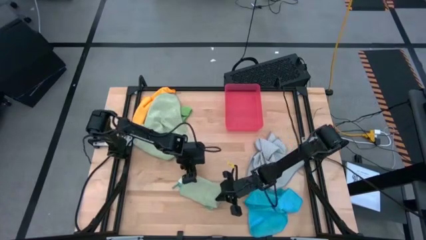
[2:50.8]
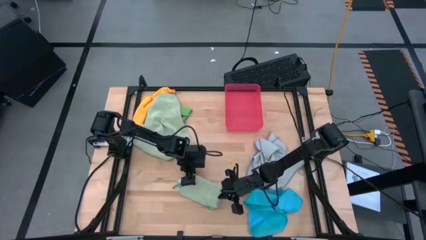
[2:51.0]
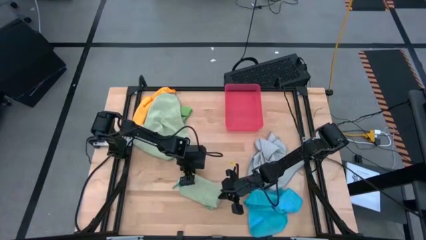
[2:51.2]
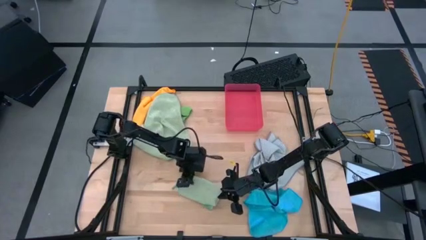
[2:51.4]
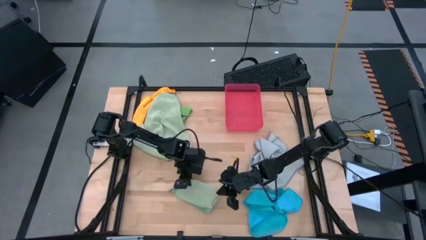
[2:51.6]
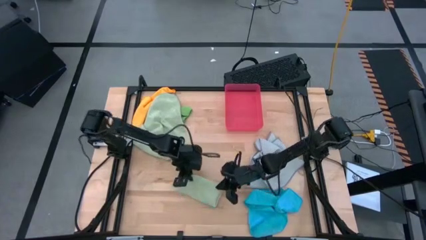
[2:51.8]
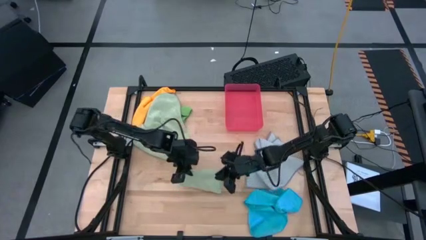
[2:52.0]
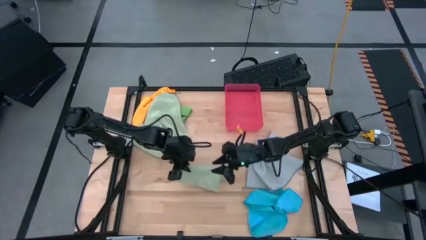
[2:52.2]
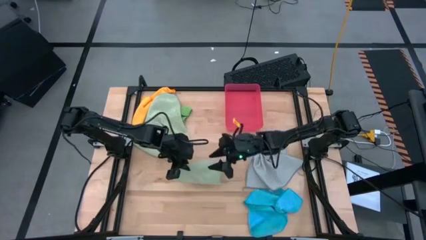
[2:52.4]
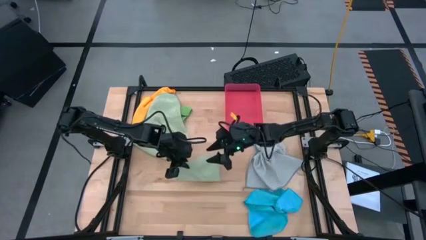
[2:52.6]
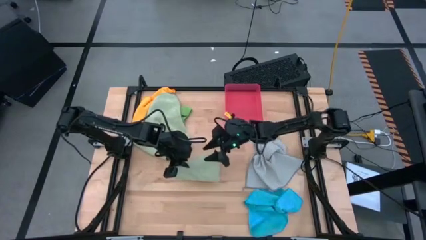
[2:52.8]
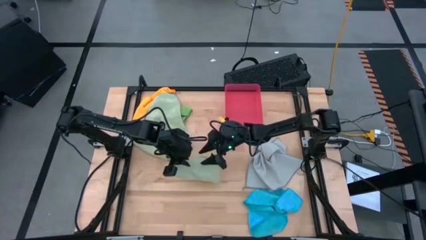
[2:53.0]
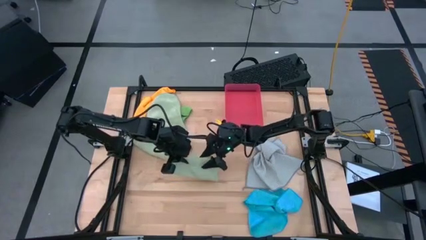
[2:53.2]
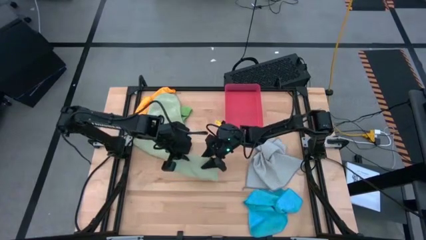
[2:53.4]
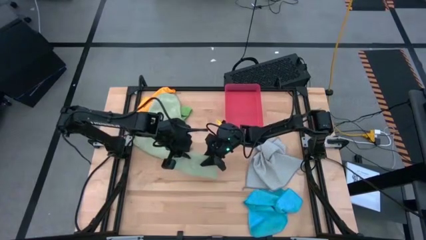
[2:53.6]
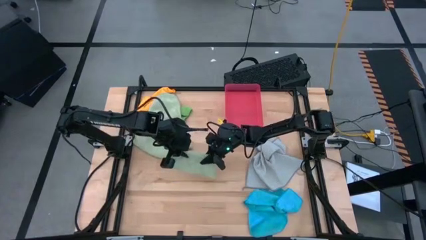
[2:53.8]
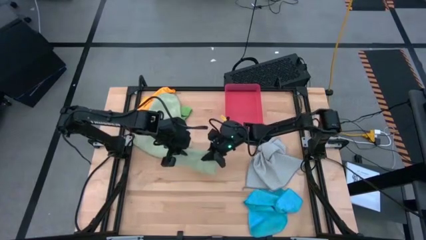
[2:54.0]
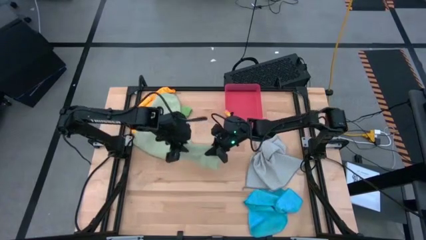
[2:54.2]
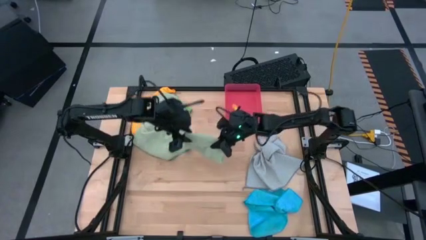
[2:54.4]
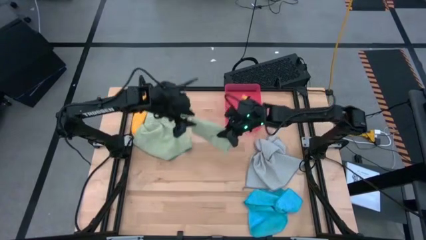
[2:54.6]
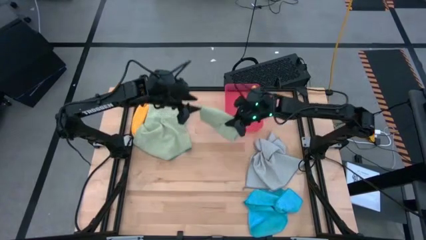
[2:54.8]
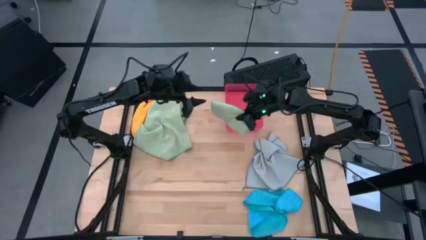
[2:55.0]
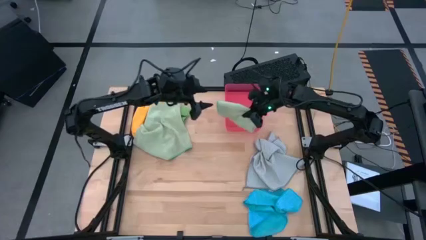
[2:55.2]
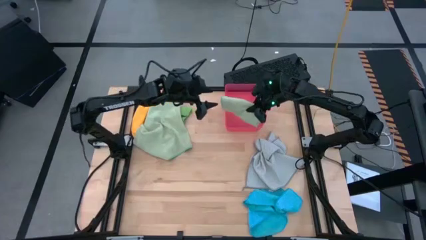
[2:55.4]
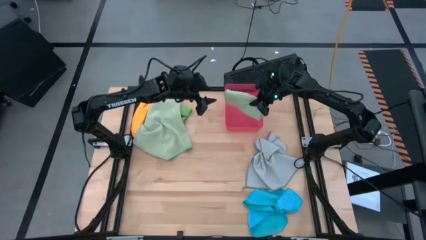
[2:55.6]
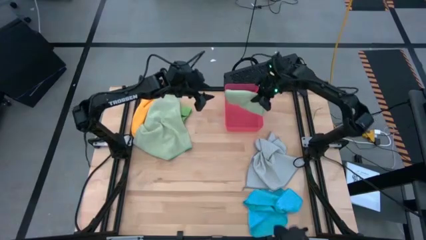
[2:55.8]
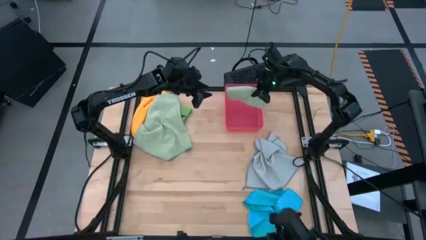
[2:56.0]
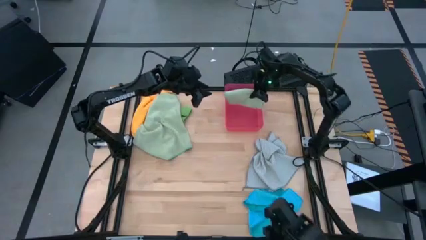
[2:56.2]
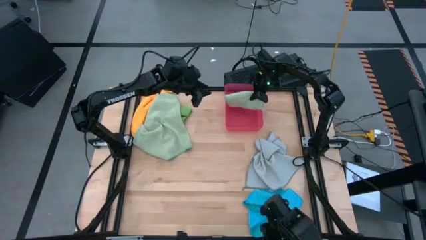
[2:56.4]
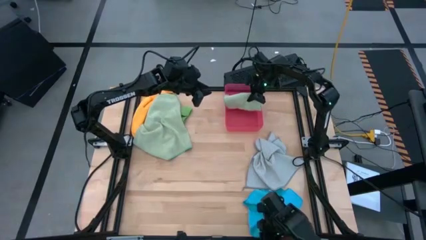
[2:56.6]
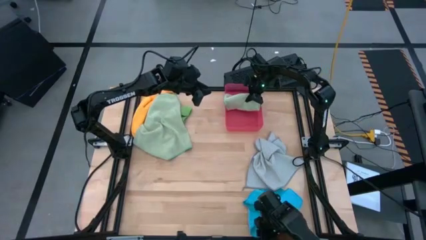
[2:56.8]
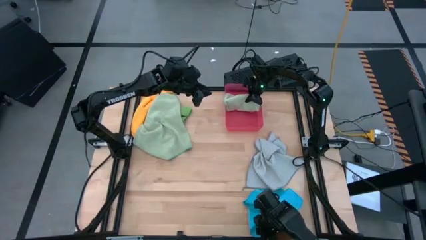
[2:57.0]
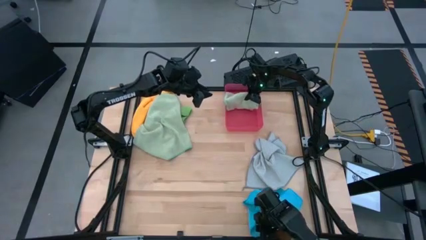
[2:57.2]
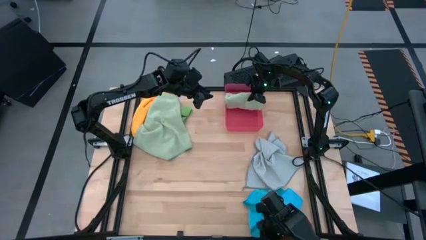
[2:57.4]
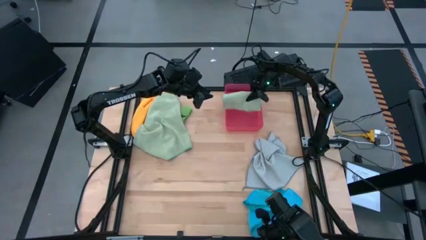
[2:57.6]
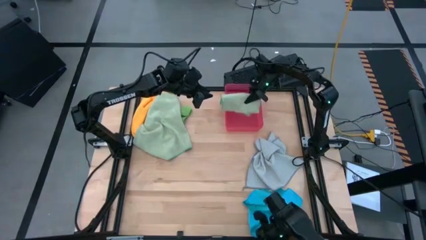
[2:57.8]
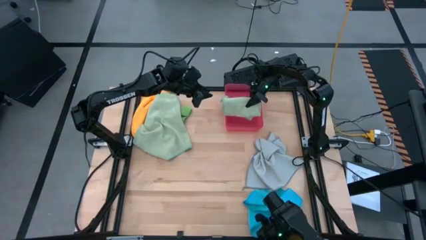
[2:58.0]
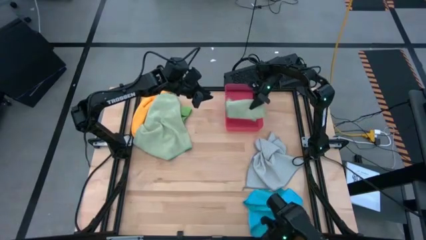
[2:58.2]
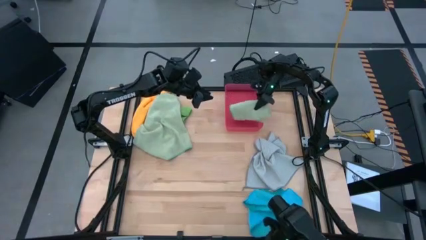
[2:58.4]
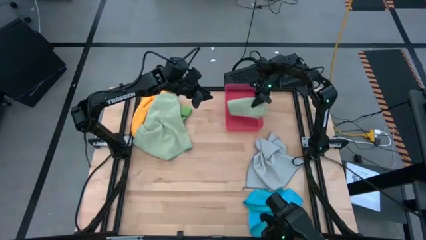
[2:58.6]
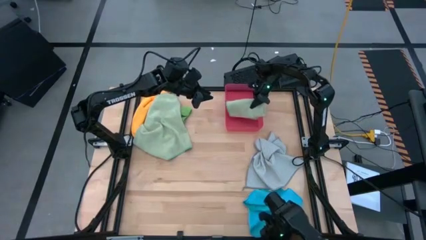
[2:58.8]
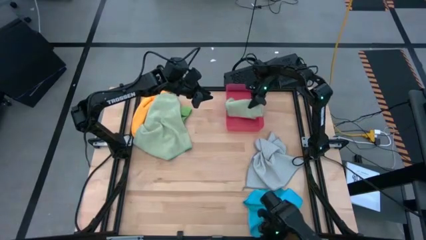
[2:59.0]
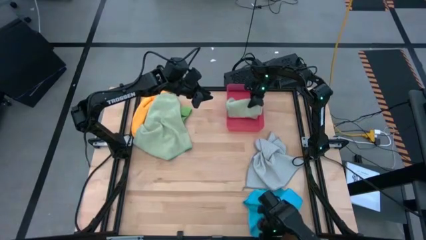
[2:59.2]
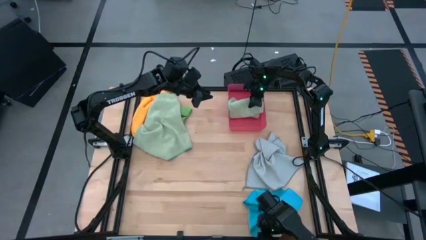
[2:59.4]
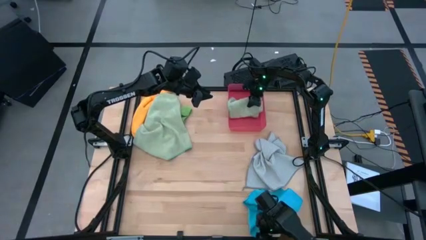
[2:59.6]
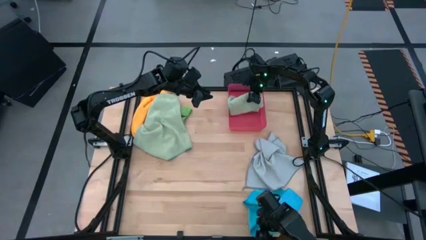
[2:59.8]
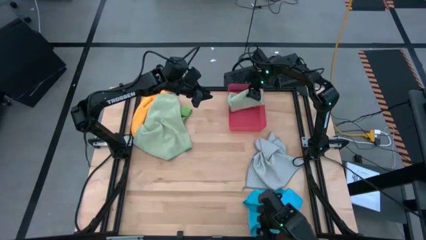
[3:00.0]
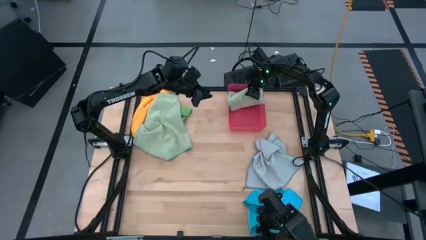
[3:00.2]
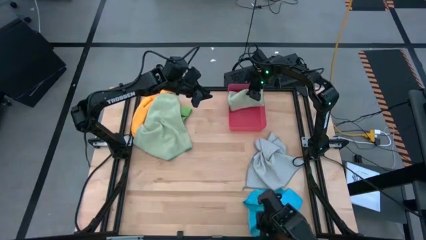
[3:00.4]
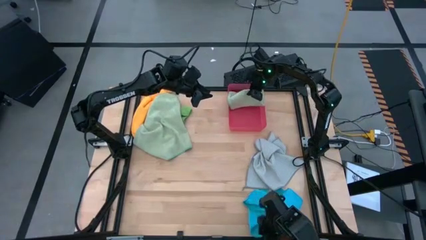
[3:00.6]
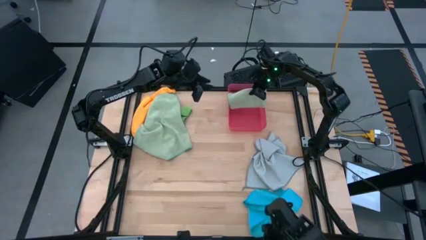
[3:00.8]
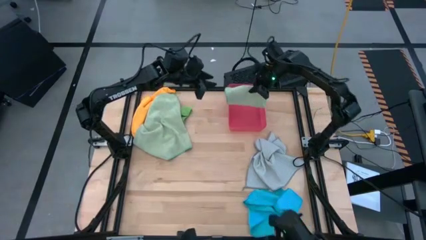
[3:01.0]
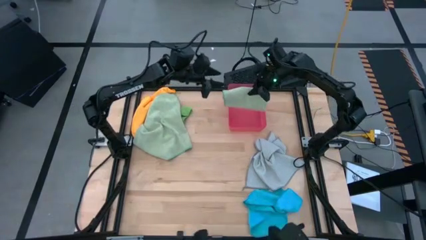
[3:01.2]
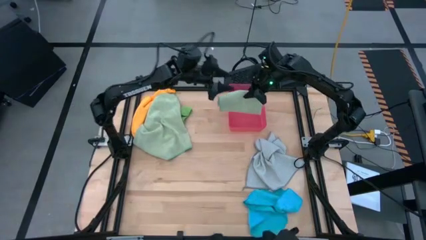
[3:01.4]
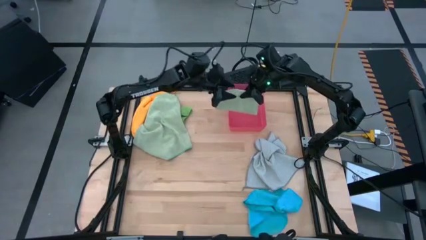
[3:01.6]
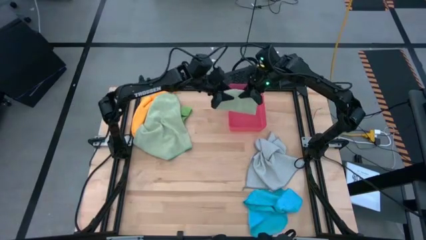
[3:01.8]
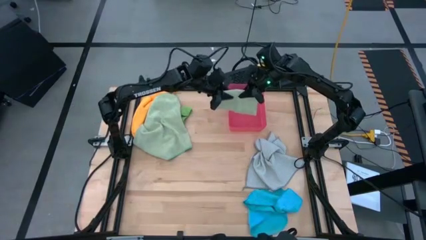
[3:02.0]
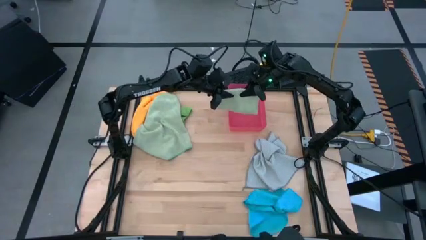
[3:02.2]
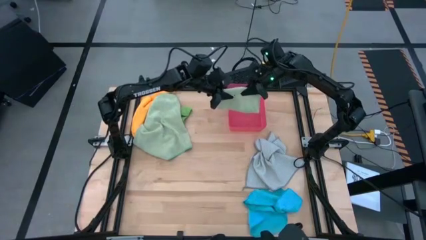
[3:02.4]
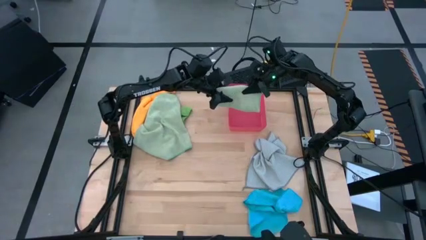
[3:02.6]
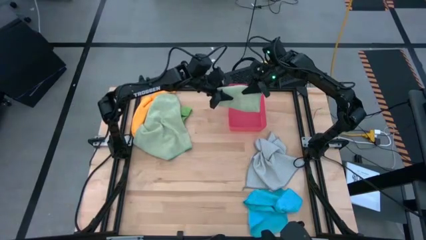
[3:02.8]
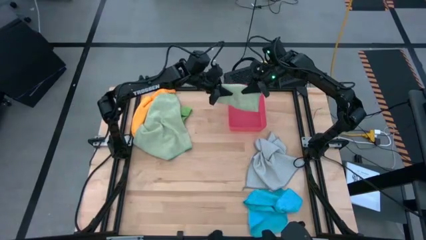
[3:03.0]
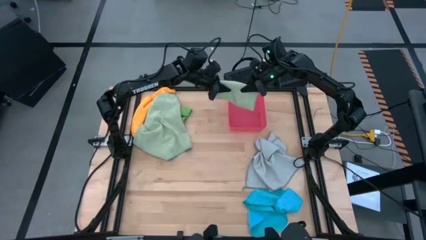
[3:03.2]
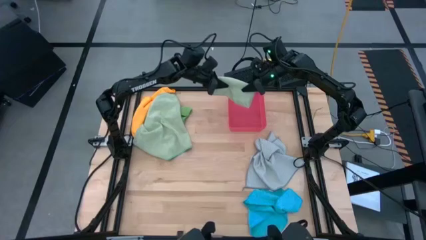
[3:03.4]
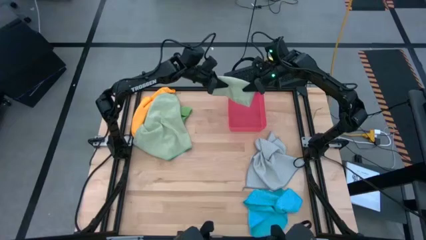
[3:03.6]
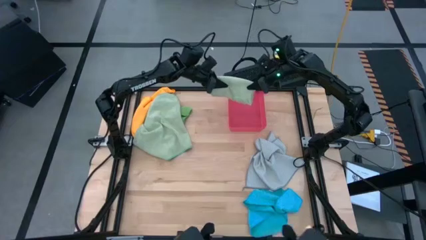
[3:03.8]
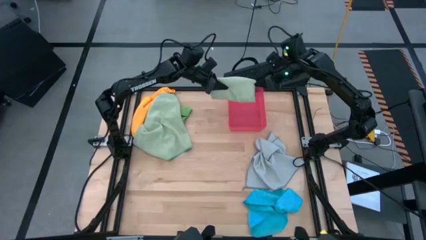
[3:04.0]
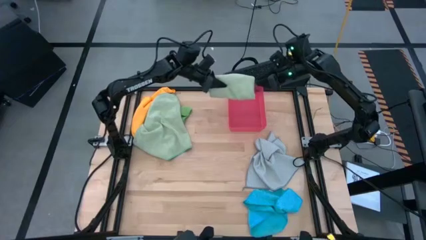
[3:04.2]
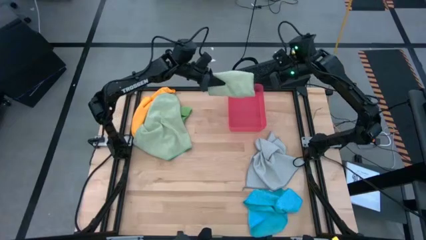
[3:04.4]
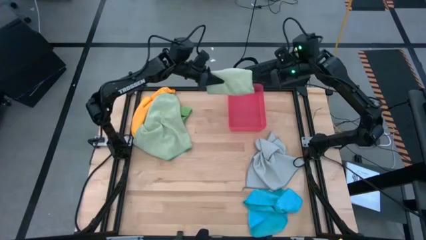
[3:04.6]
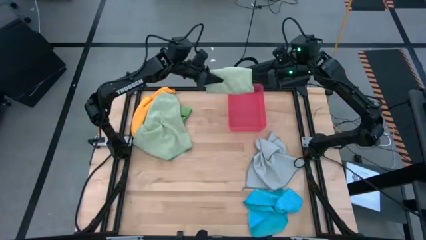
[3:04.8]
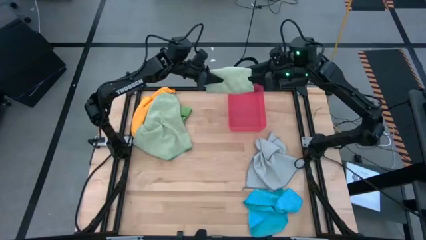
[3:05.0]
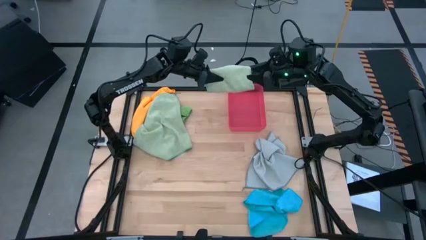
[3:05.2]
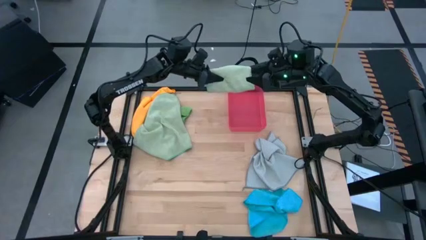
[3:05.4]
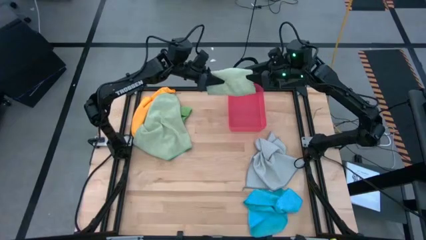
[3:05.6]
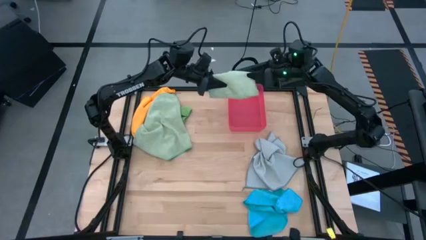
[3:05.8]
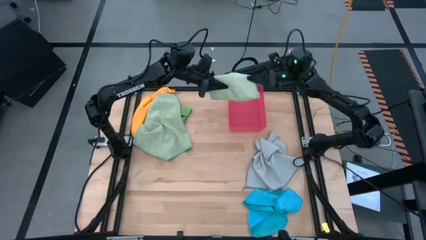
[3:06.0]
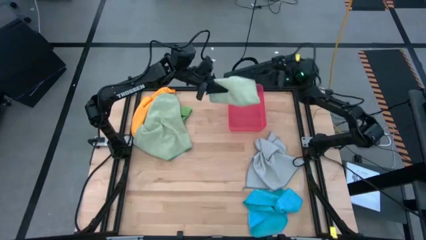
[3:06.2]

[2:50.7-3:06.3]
Task: Fold microfiber towels
Put the right light green microfiber cloth into the red bin
